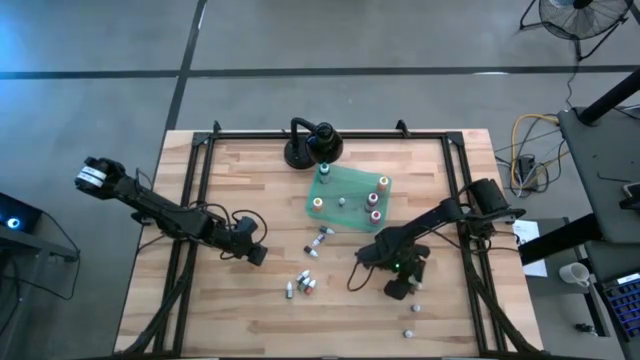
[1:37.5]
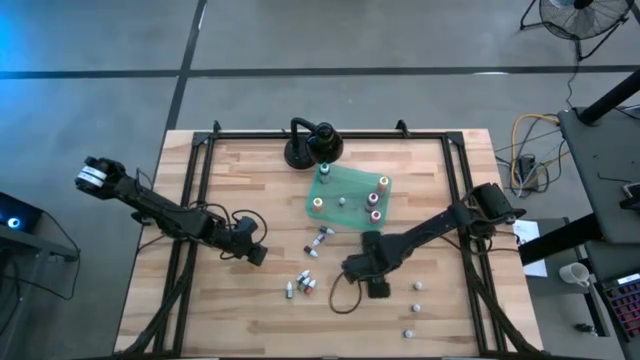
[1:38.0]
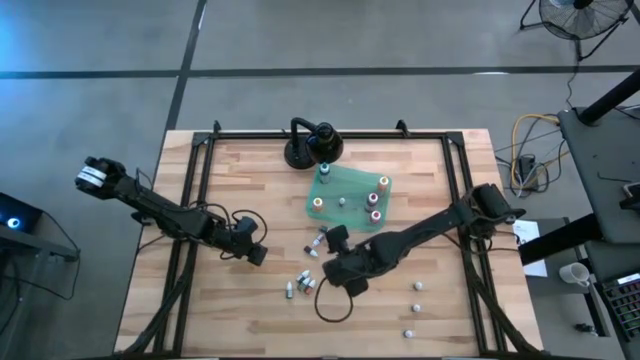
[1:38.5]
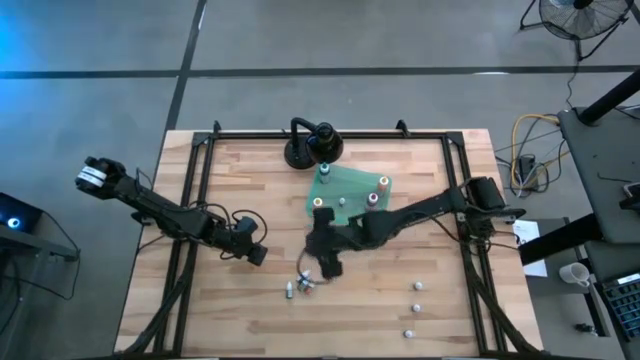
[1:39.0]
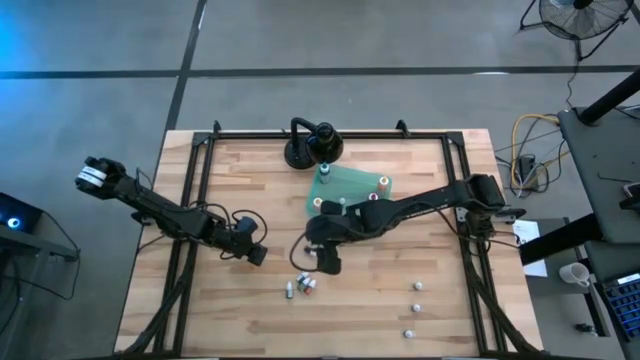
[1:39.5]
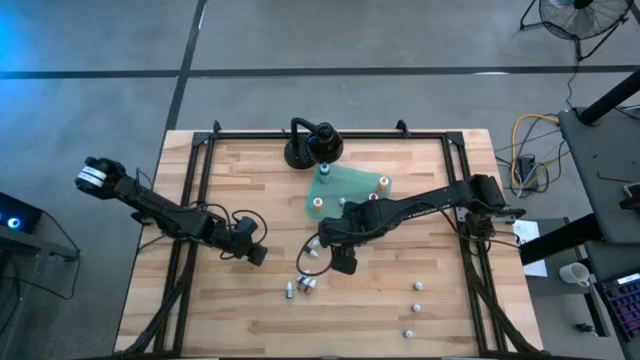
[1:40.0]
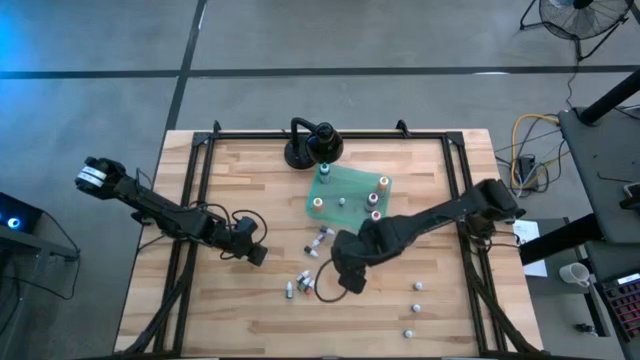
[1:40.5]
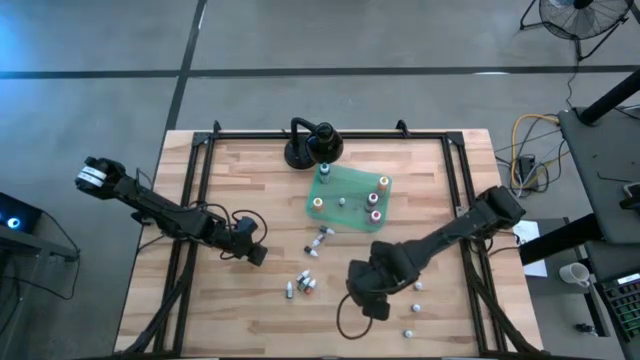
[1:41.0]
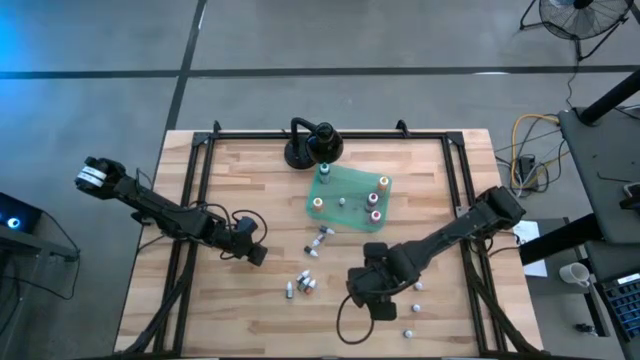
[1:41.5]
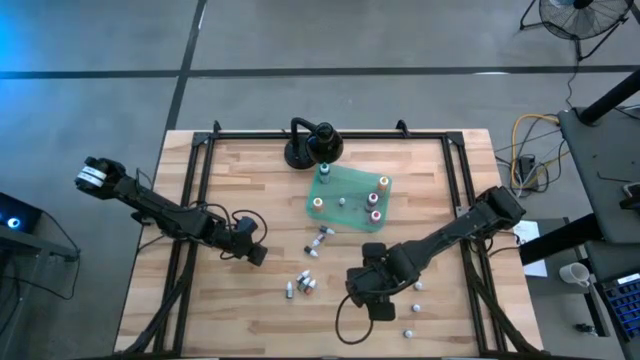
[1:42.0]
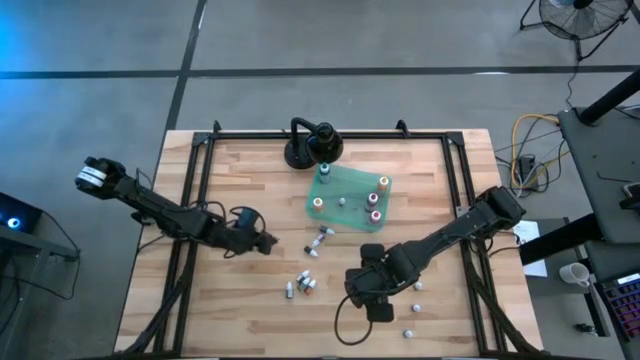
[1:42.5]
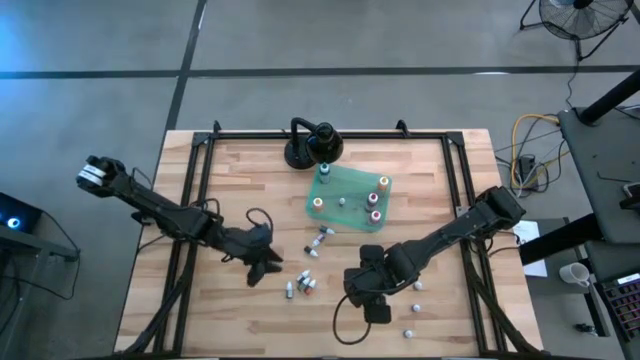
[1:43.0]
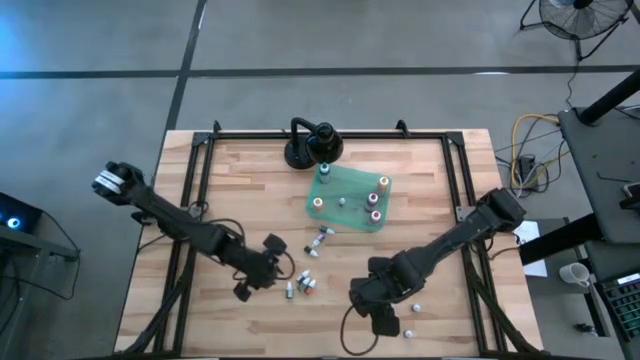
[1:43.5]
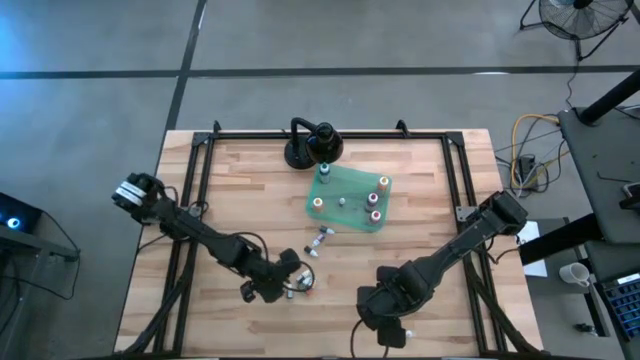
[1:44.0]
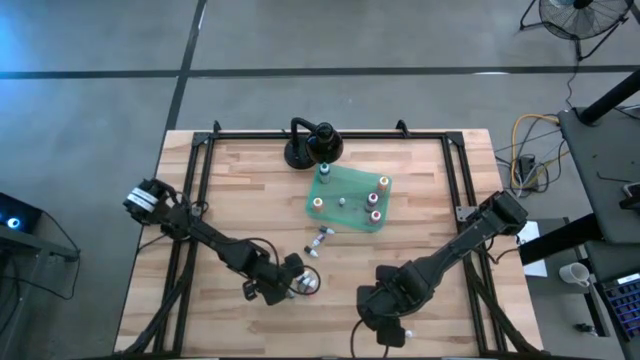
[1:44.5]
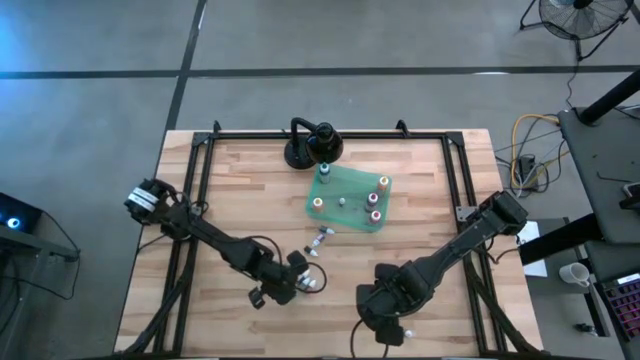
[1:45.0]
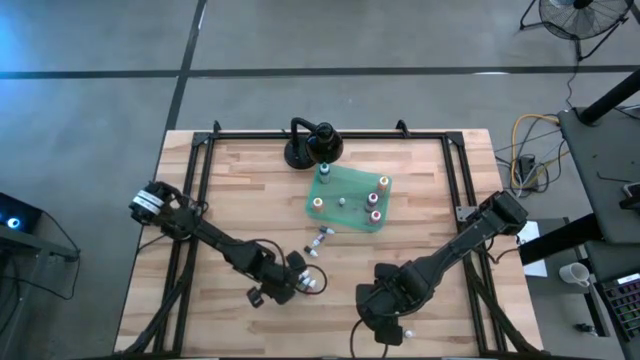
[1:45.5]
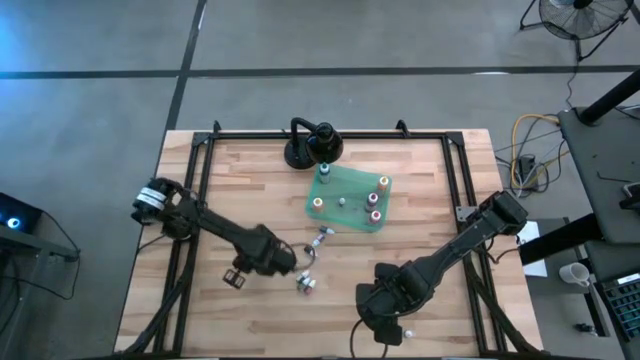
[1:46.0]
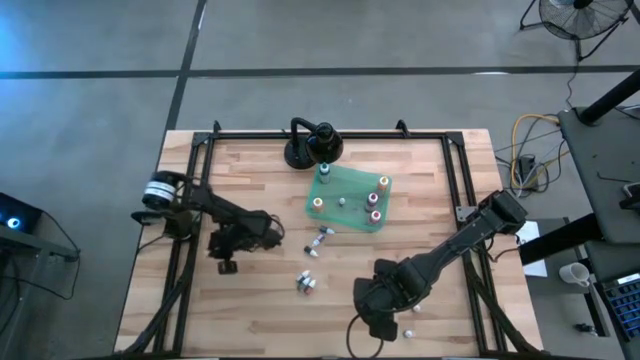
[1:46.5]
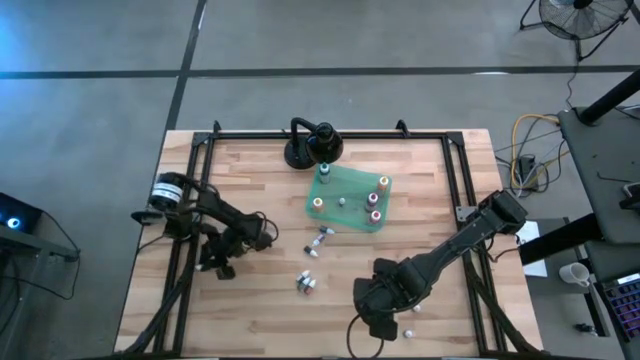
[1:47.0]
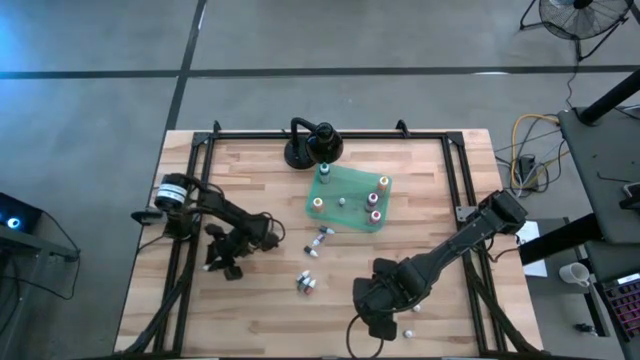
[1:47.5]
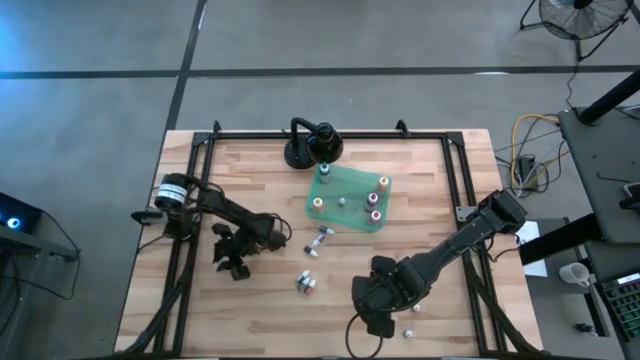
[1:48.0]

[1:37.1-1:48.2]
Task: Pick & Place food coloring
Move the green food coloring bottle to the middle left of the table

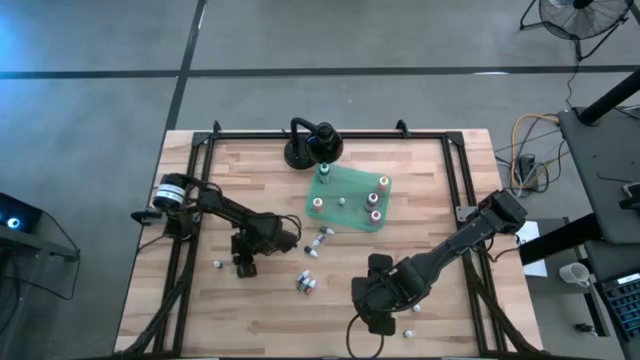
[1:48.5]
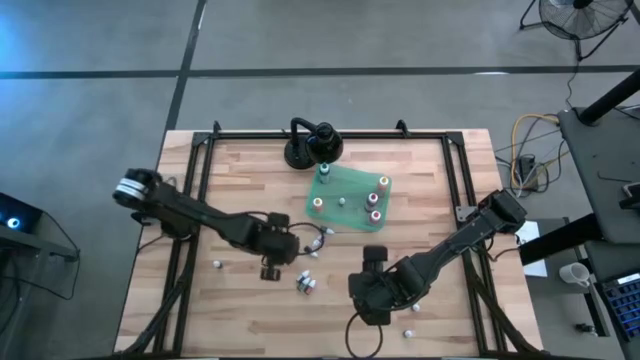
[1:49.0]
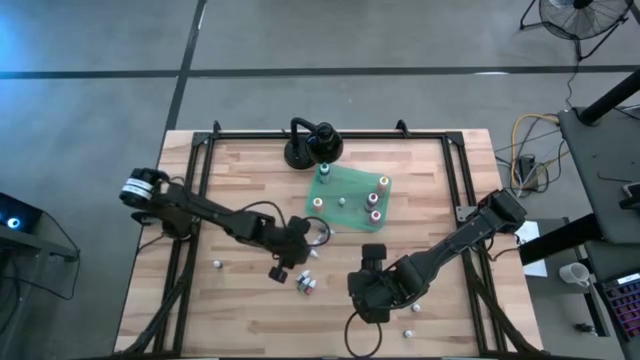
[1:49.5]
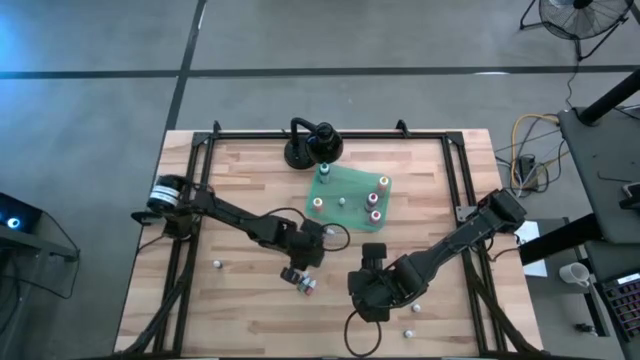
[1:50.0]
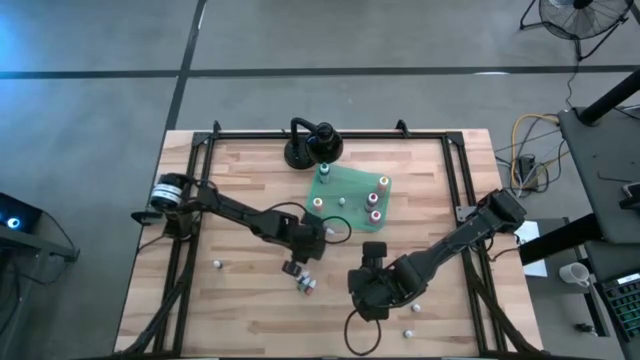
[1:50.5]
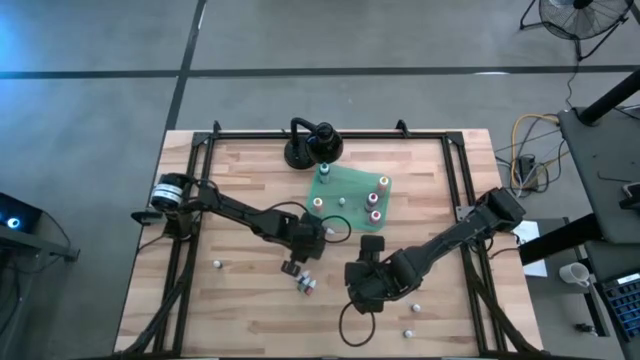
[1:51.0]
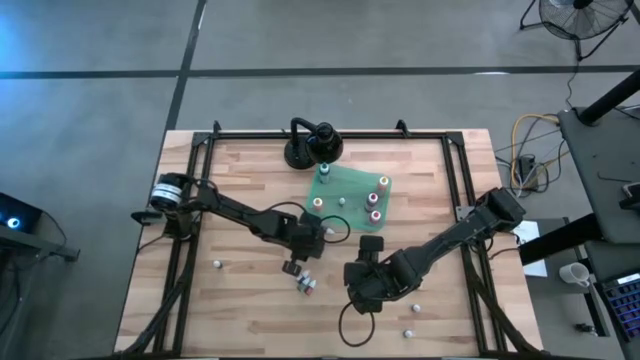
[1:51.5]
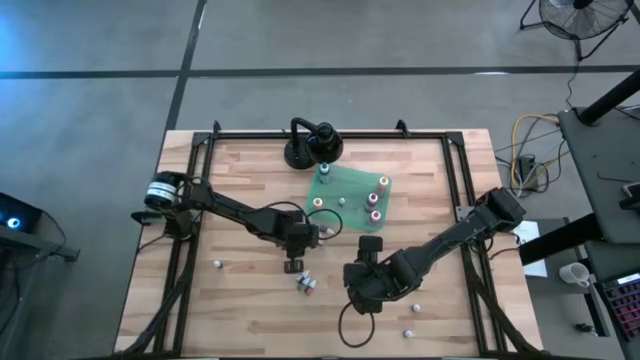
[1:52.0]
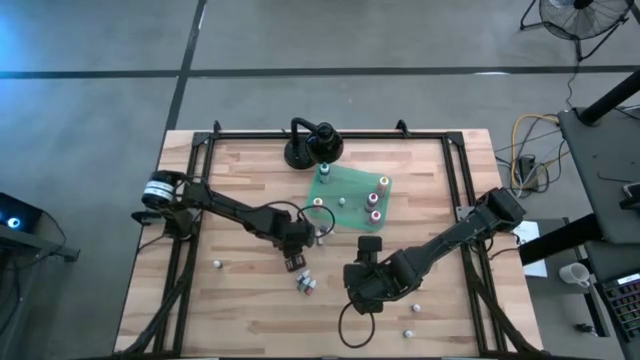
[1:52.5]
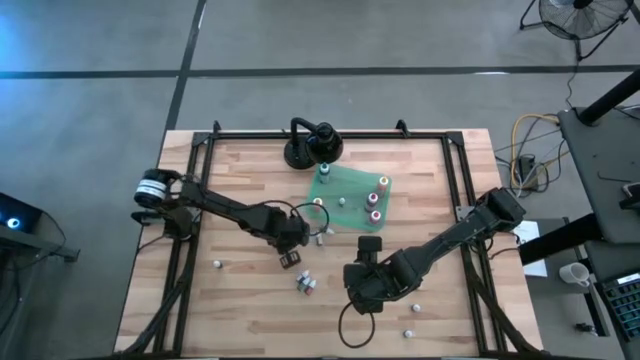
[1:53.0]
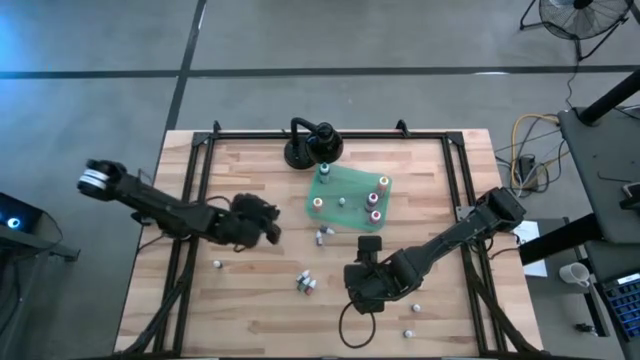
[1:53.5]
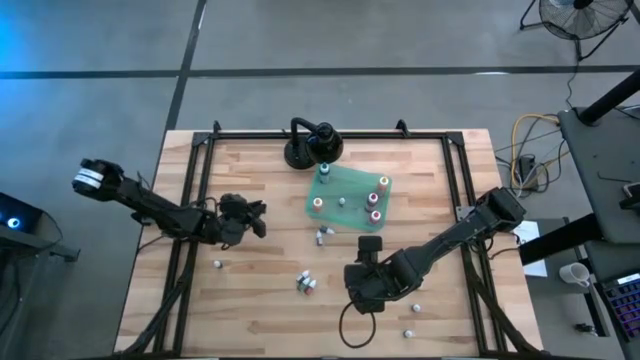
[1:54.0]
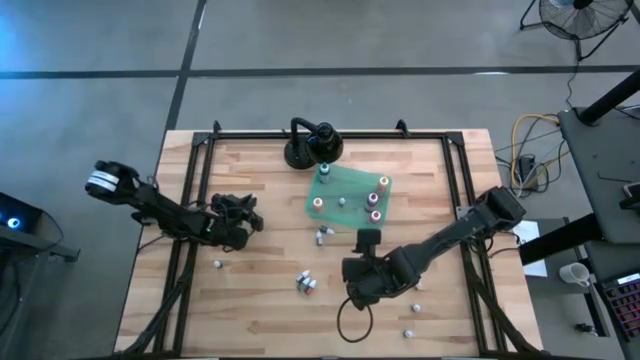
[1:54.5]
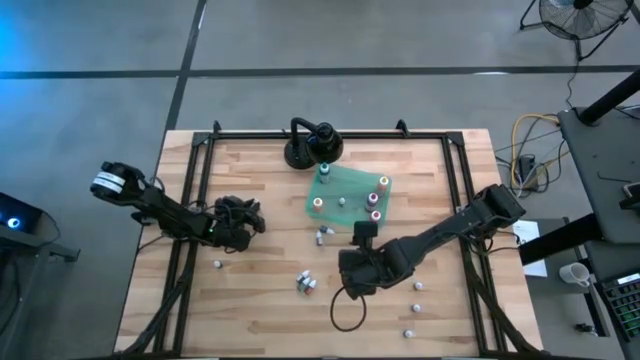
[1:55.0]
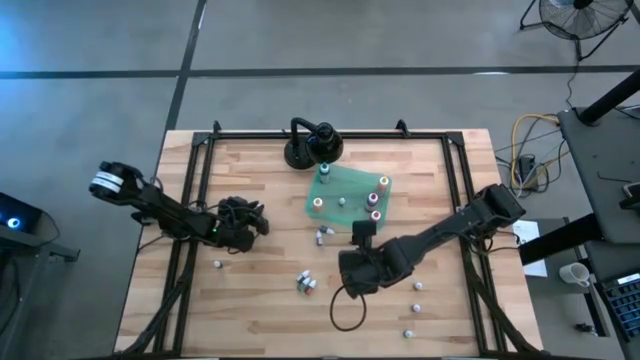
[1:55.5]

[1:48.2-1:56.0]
Move the violet food coloring bottle to the middle left of the table

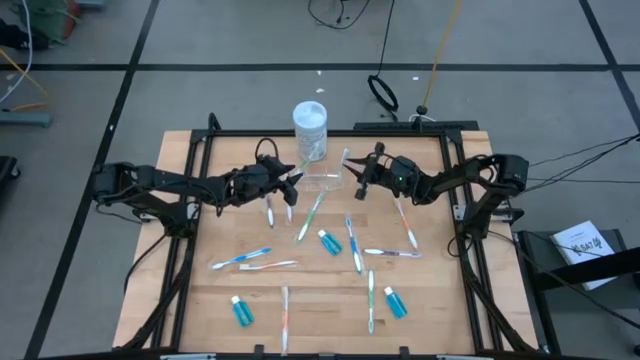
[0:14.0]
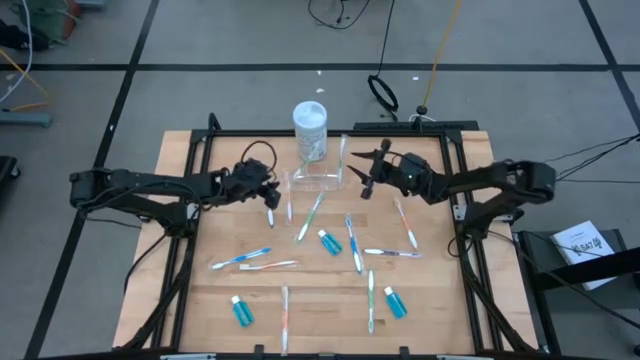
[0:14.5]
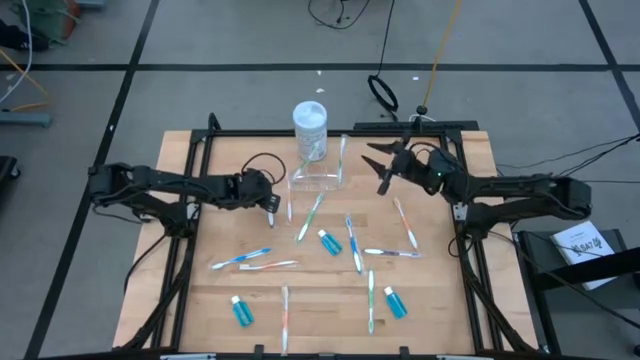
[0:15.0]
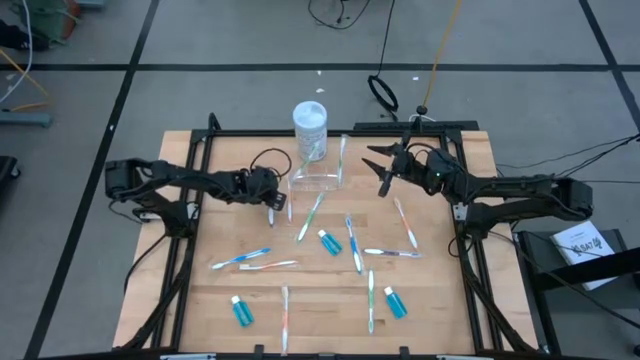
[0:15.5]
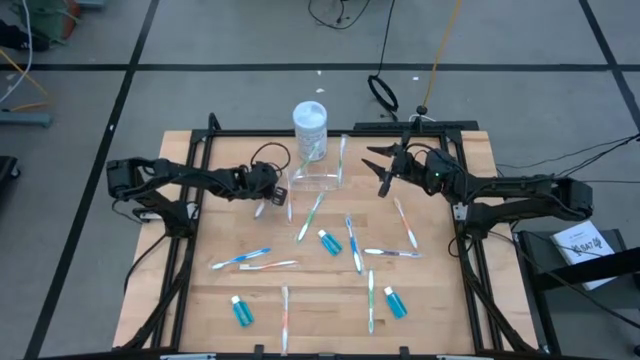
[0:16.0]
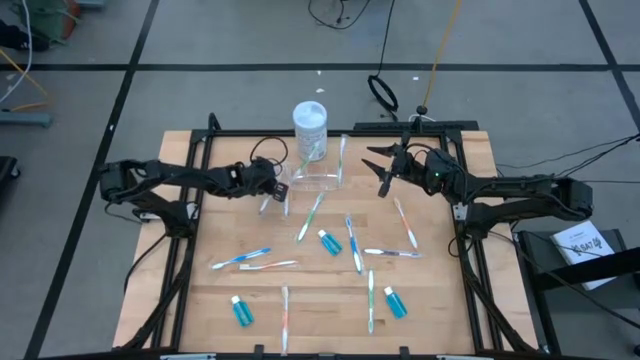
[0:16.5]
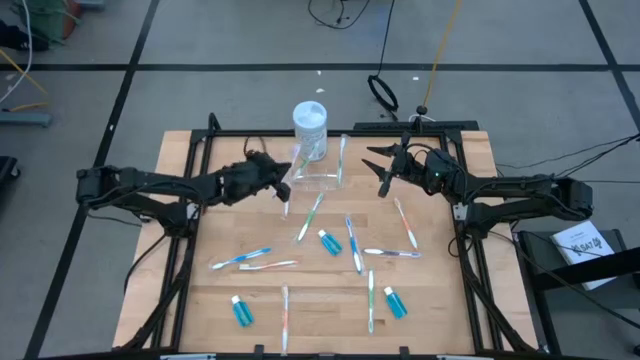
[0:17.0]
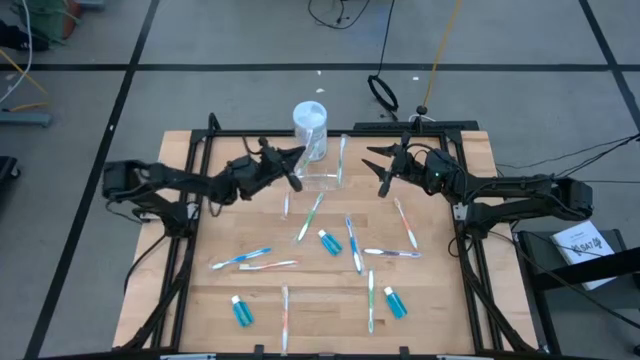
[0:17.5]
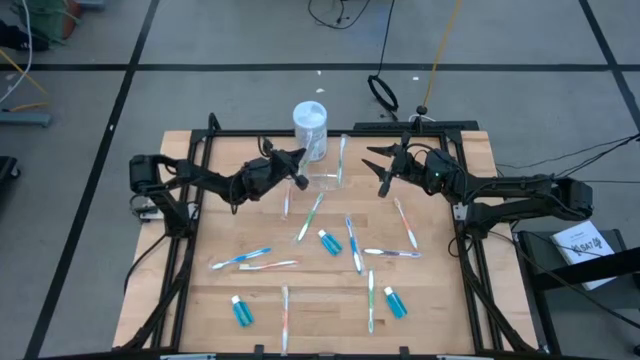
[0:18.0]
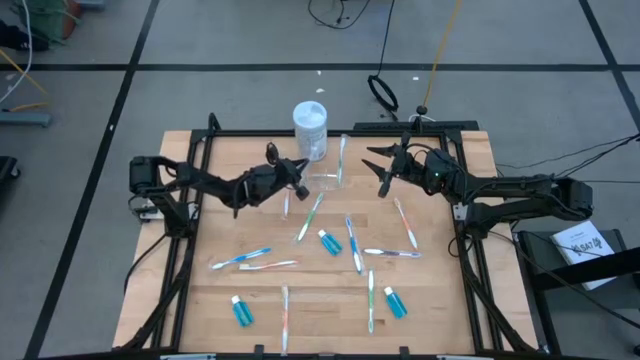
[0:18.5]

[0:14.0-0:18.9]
Task: Pick & Place toothbrushing station
Put the purple toothbrush into the transparent organizer
